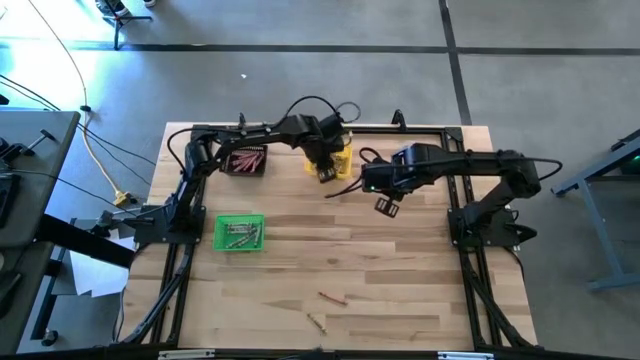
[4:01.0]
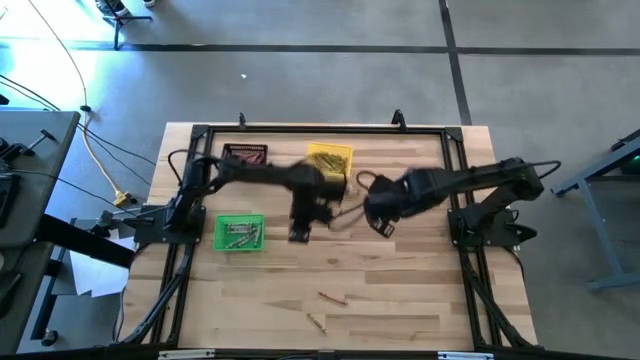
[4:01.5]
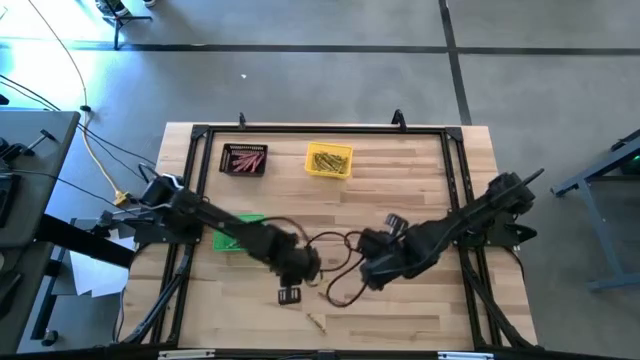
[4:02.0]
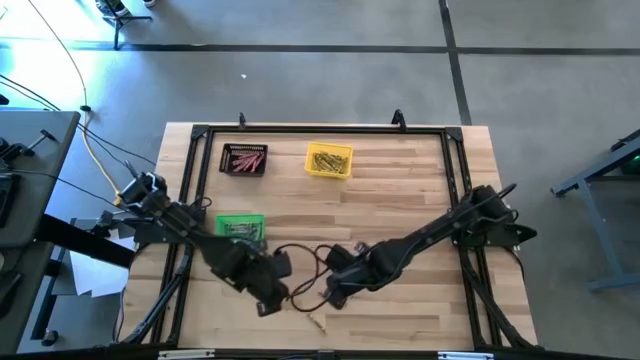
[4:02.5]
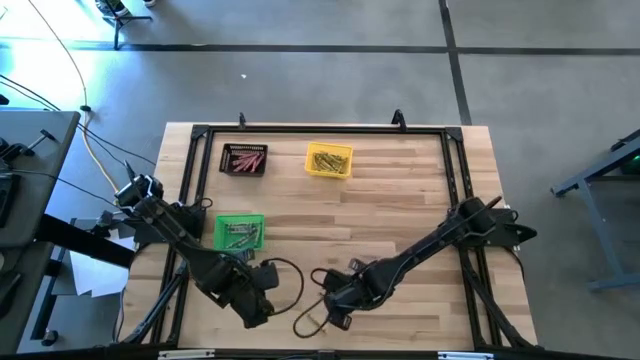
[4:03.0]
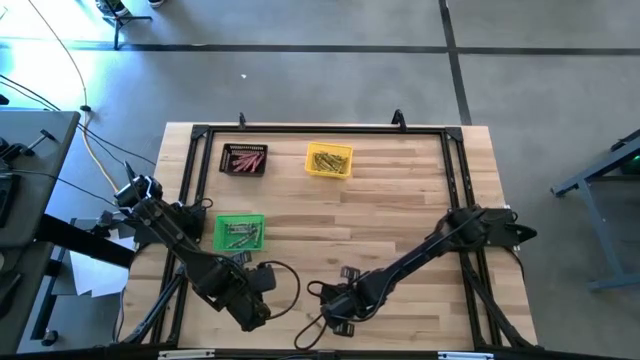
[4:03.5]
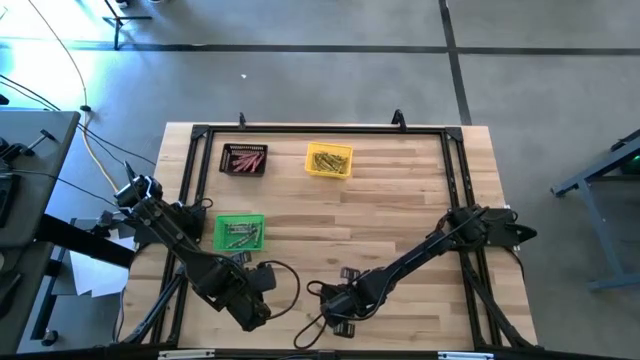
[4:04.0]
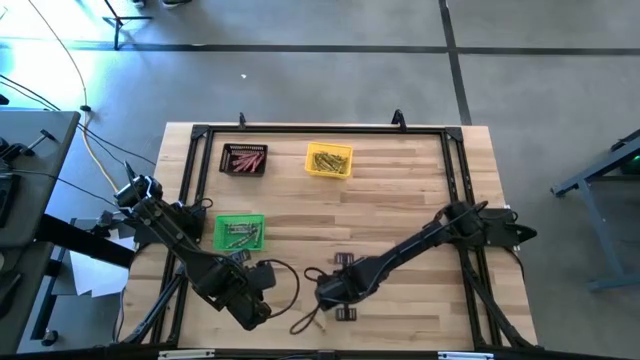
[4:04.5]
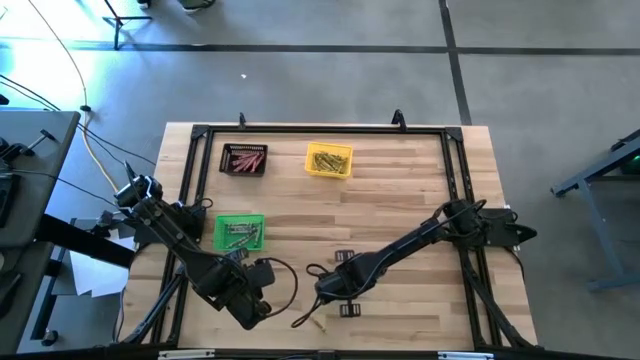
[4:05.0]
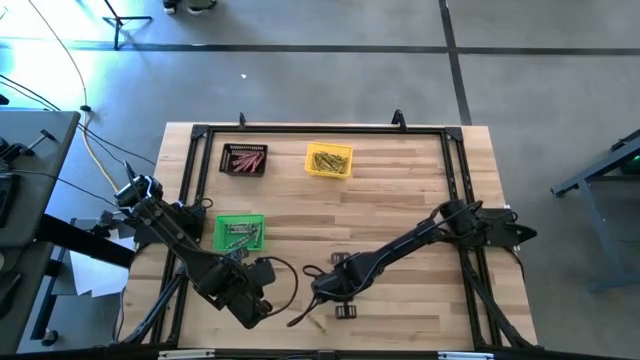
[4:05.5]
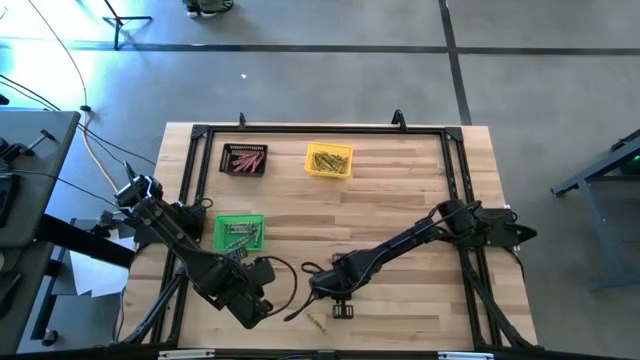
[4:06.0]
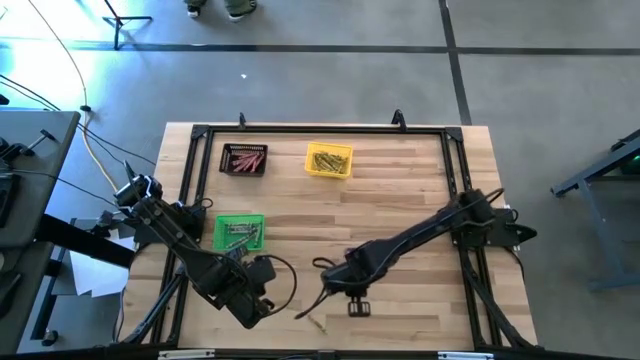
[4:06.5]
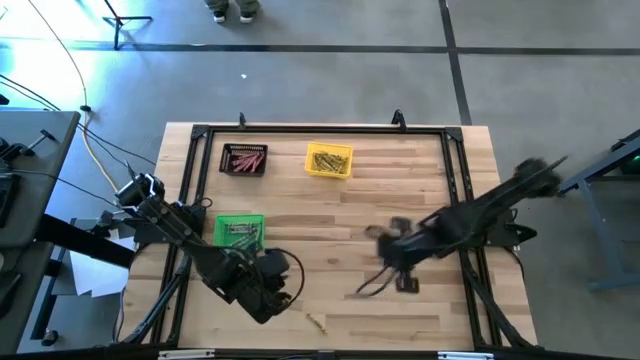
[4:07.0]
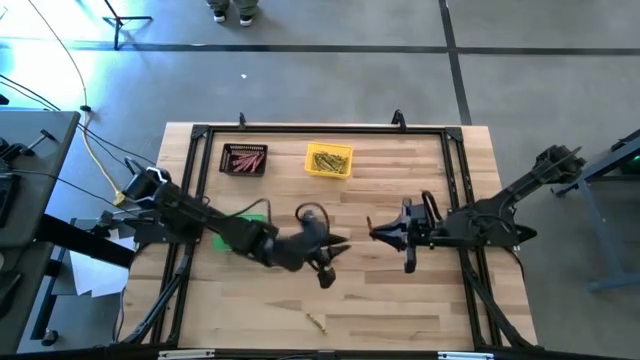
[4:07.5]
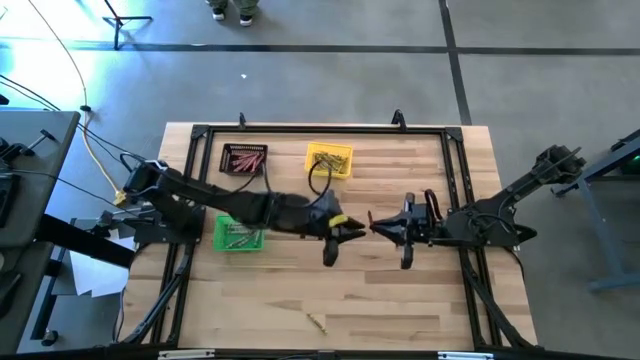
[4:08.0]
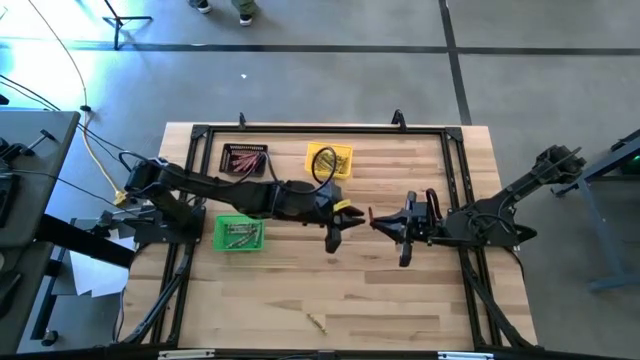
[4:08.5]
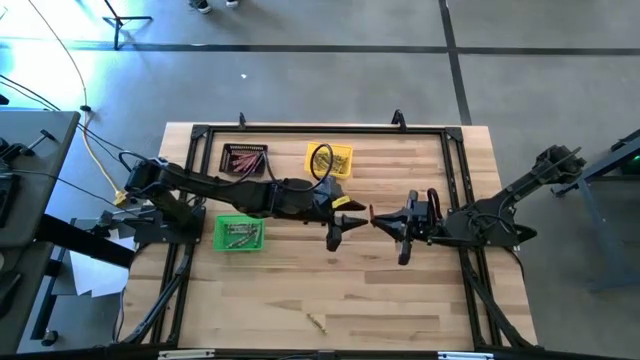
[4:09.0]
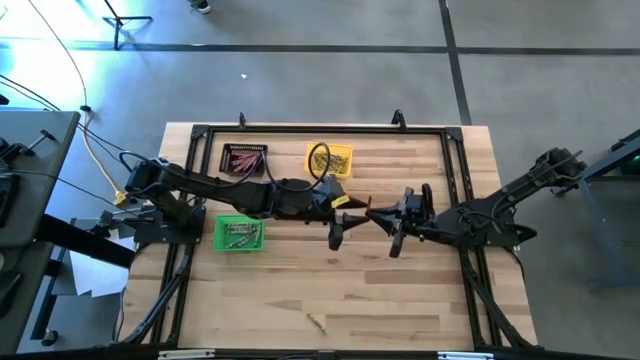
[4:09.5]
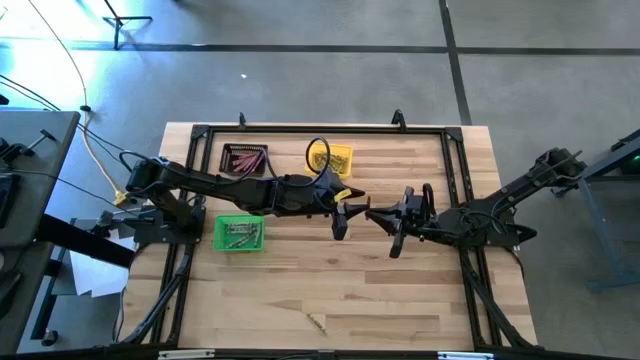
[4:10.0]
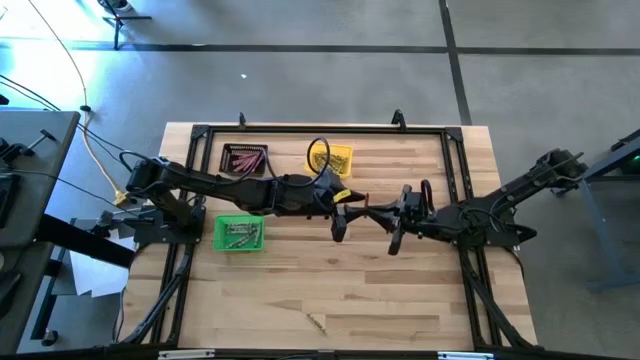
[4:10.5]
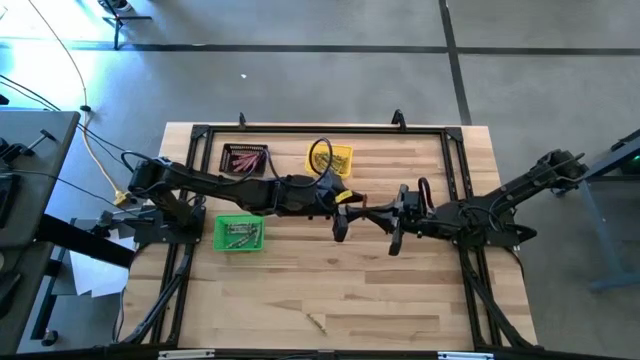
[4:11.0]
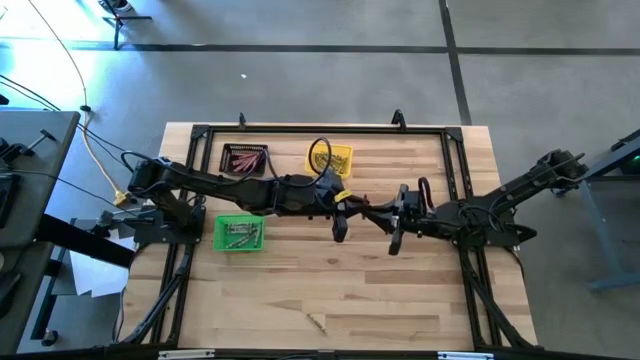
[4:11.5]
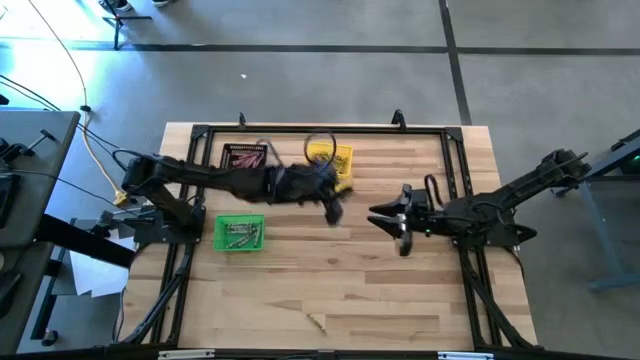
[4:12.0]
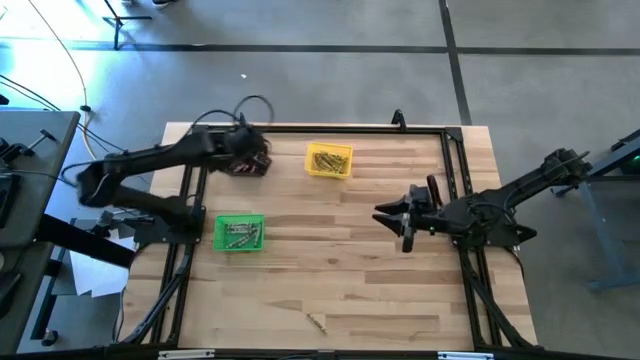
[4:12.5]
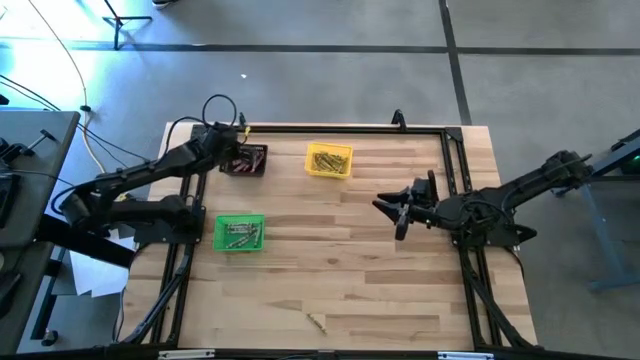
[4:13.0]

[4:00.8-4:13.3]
Task: Sort crayons
Put the red crayon into the black bin

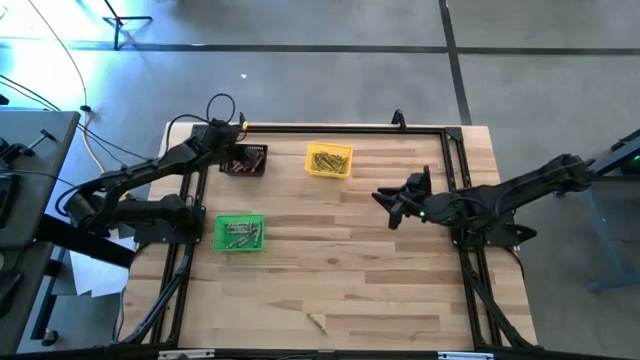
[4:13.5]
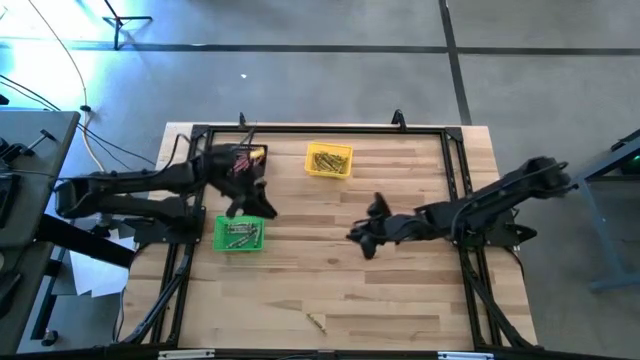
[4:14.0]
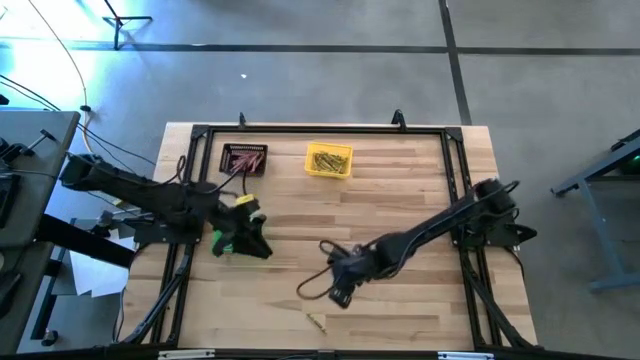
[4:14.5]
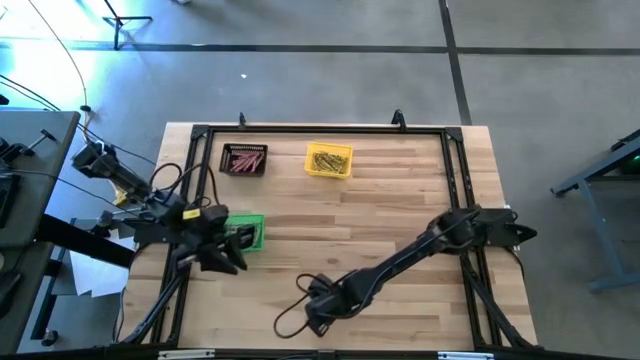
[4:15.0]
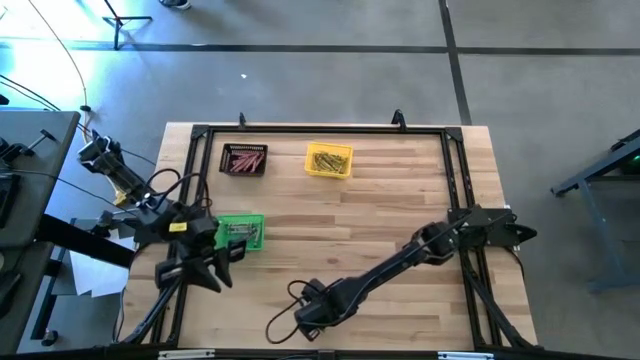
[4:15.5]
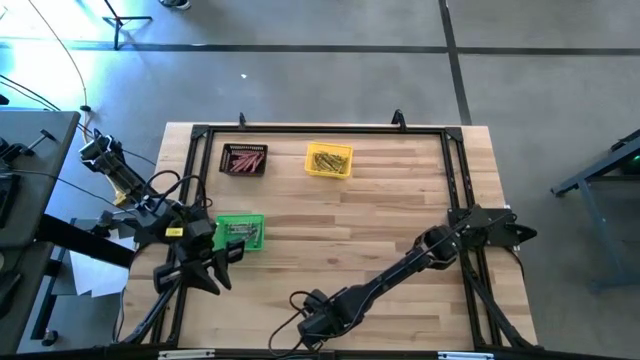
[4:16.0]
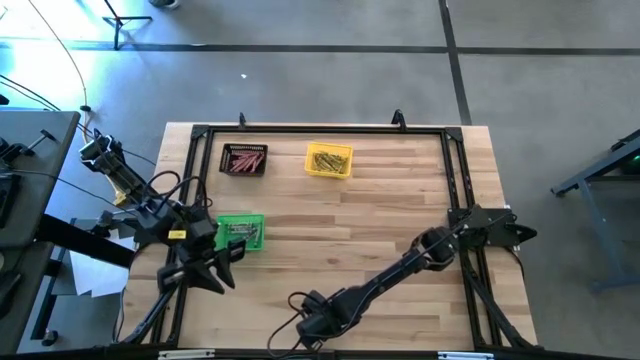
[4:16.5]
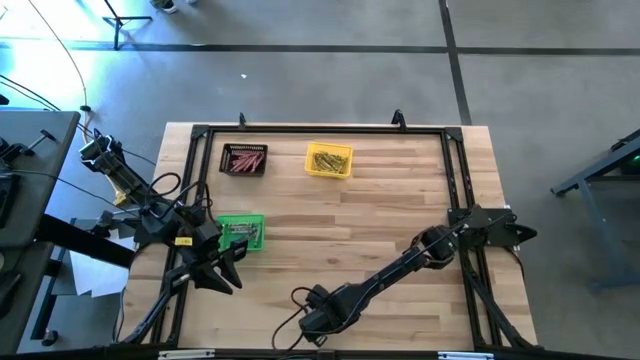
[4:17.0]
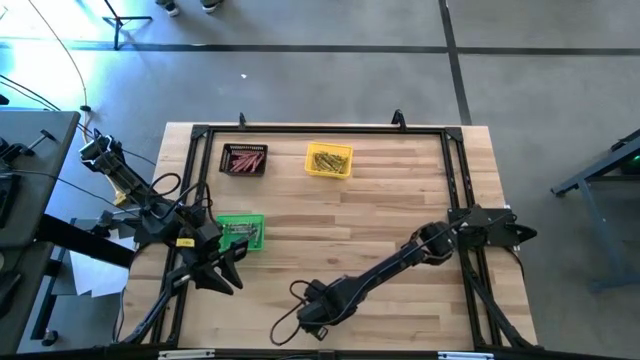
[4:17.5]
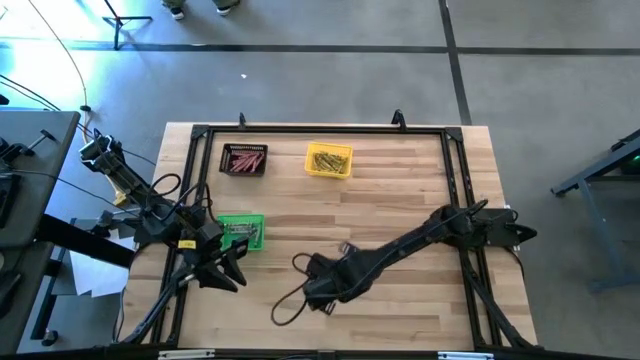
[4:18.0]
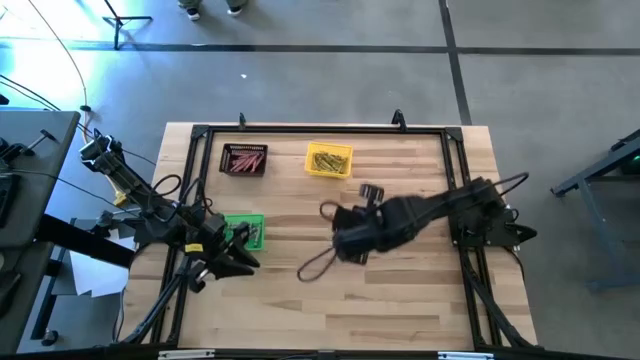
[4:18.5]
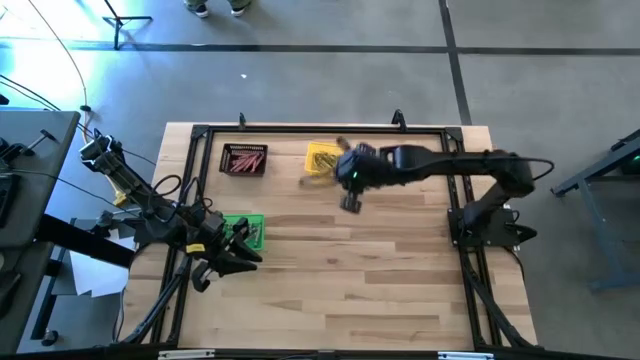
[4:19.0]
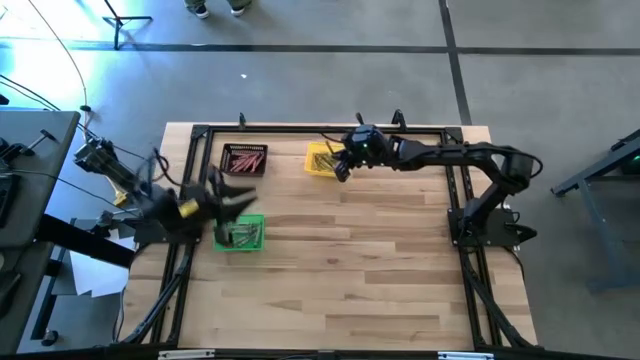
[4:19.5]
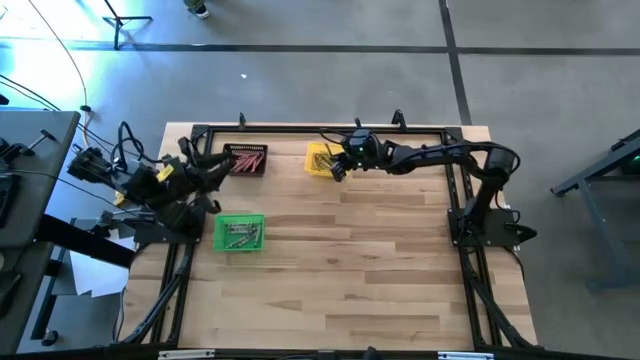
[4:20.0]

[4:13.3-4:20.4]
Put the yellow crayon into the yellow bin

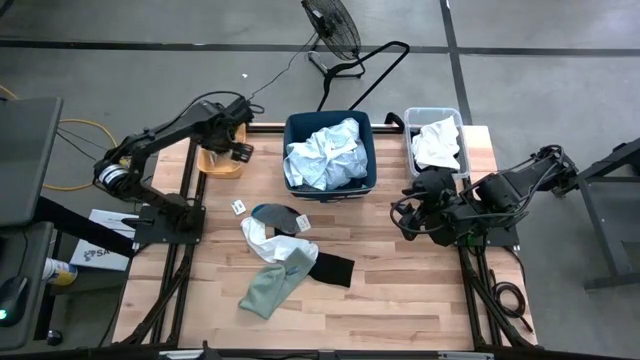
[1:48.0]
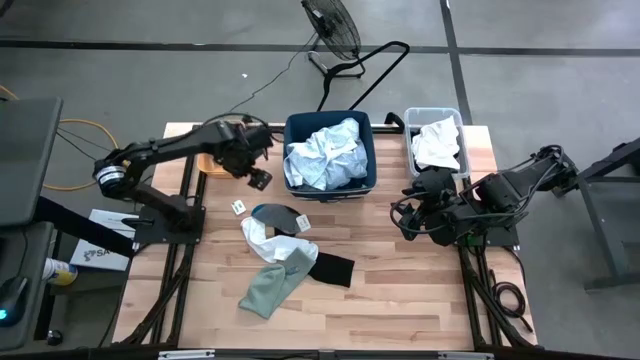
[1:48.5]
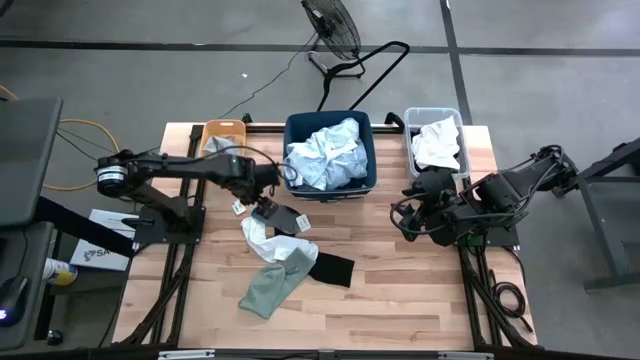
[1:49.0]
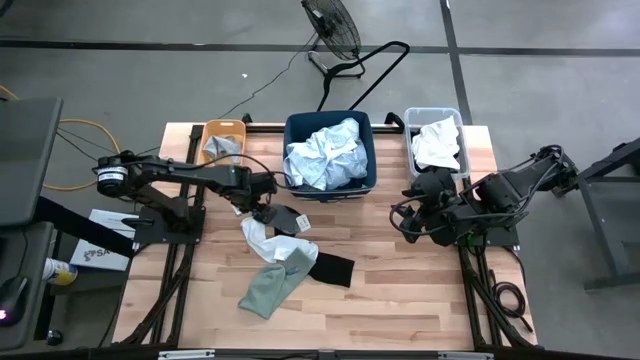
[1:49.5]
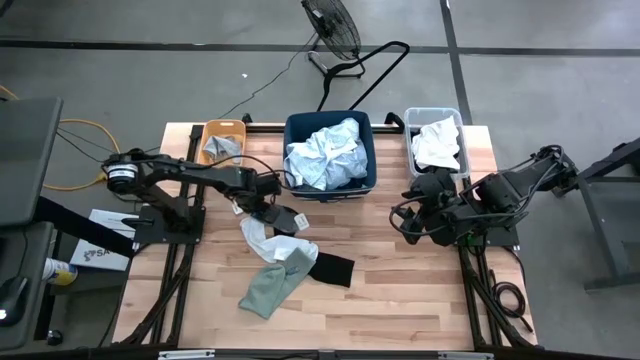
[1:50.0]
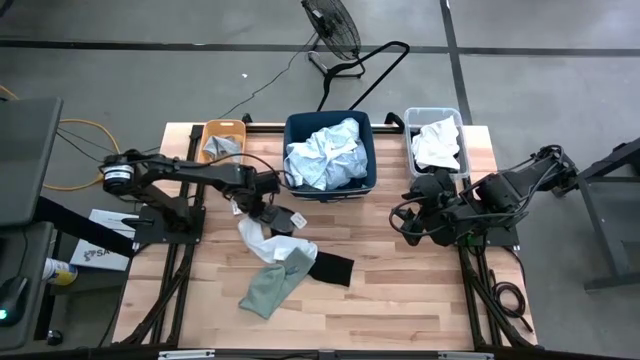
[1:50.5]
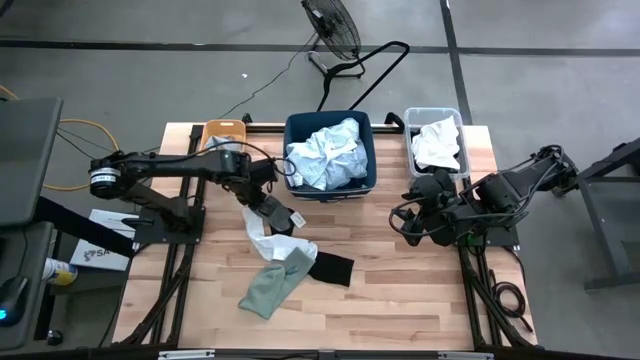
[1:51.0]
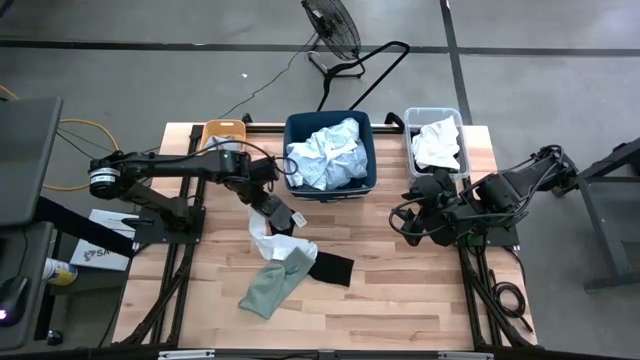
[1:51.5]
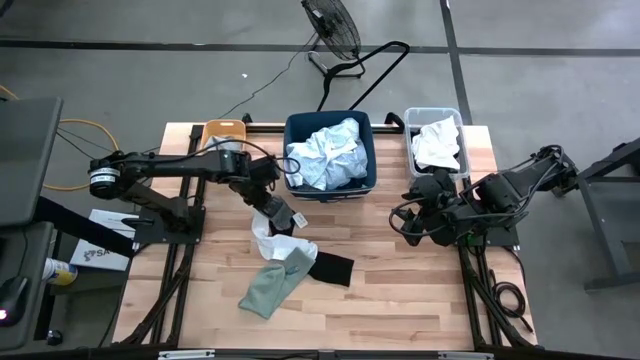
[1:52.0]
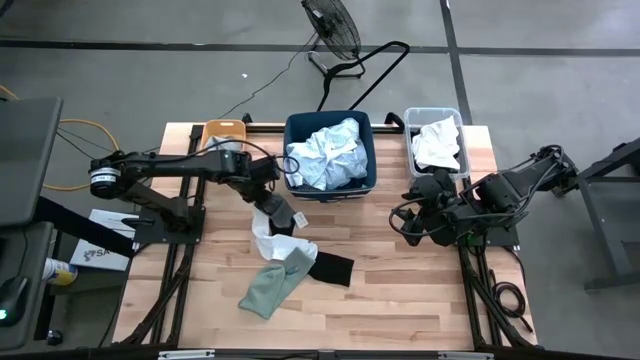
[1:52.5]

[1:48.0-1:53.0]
Task: Pick & Place Cloths
Put the gray sock into the yellow bin
